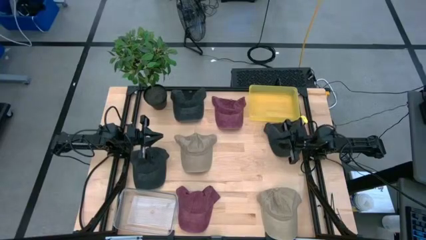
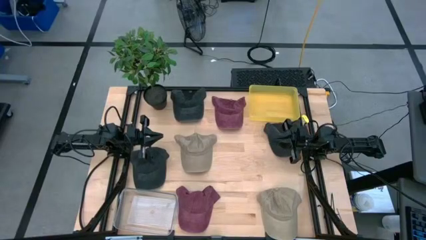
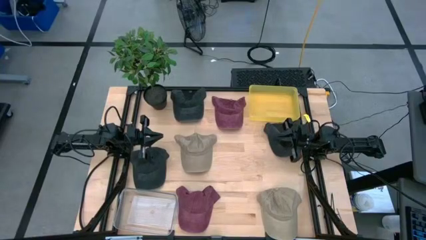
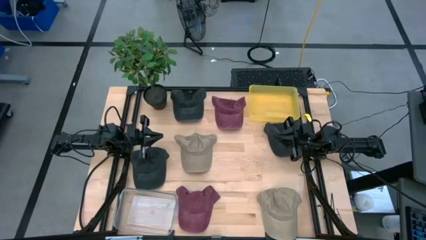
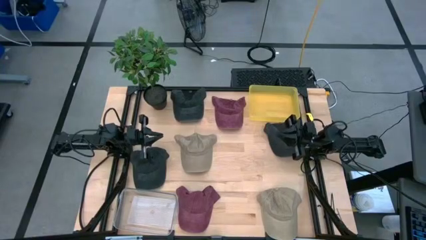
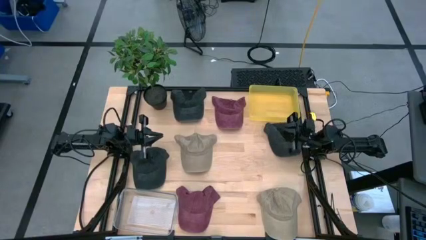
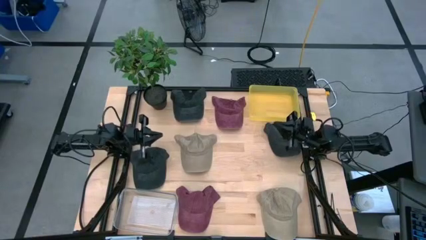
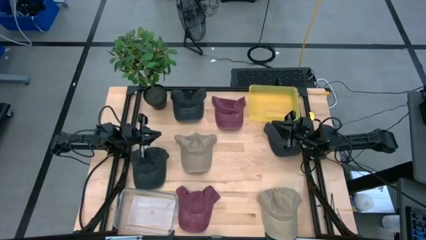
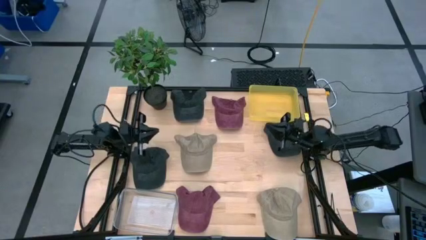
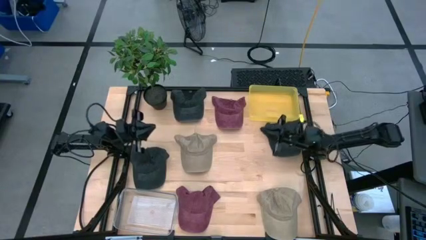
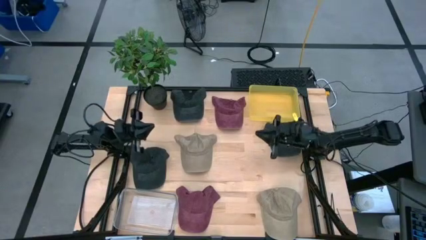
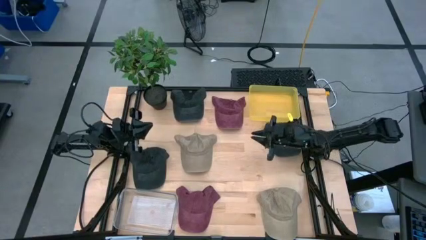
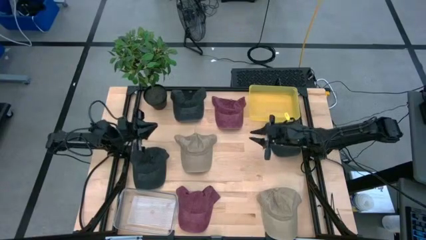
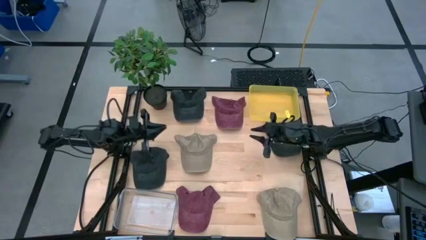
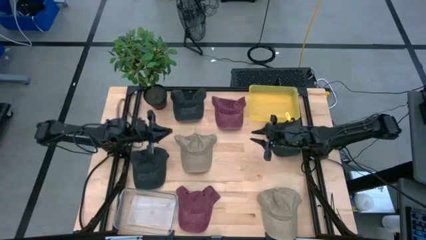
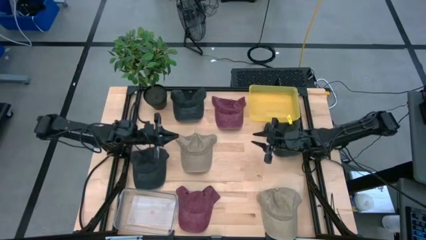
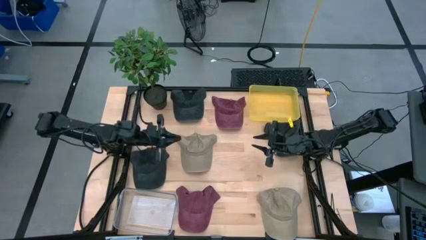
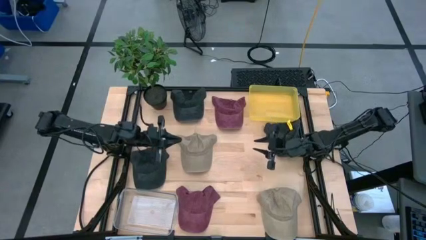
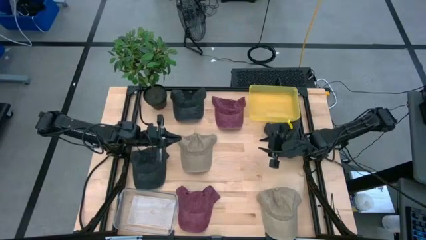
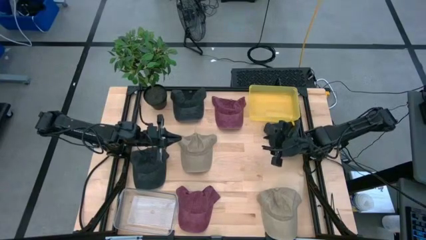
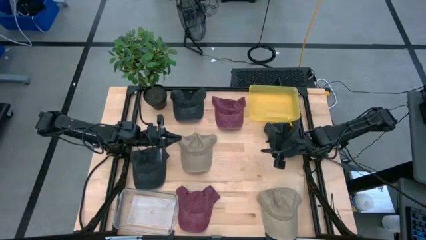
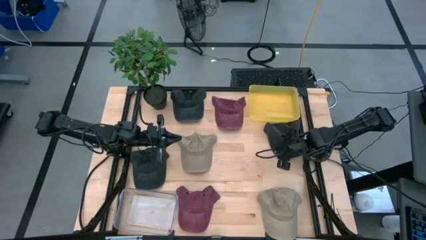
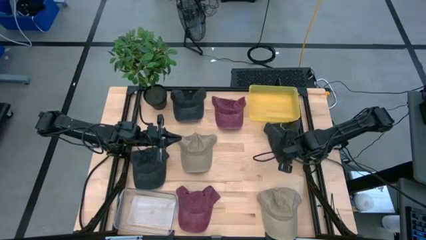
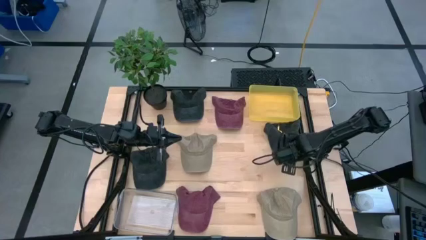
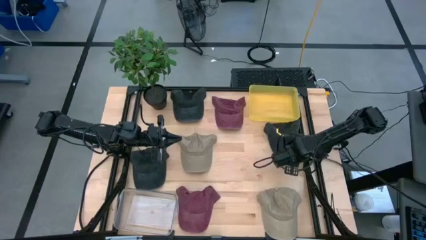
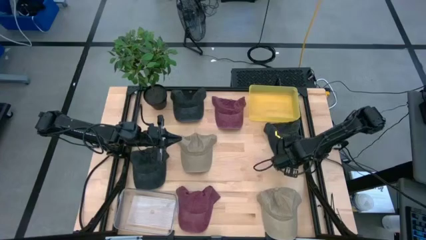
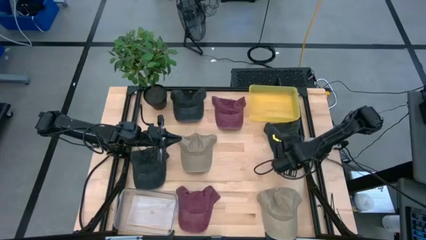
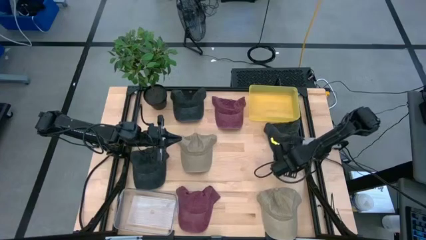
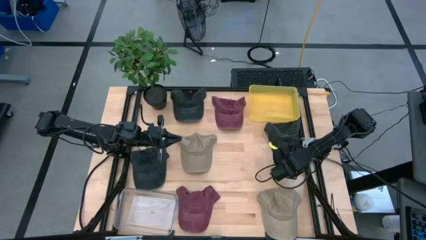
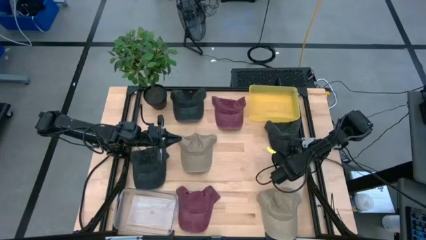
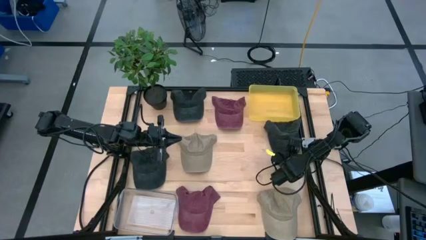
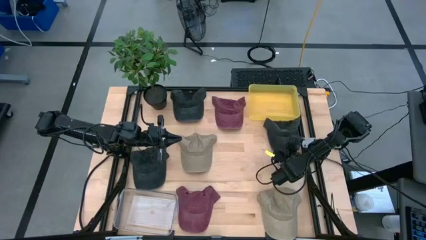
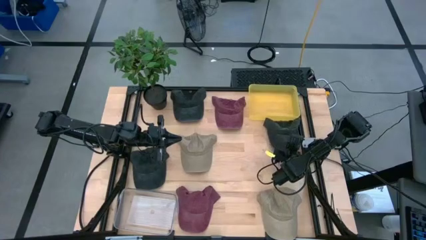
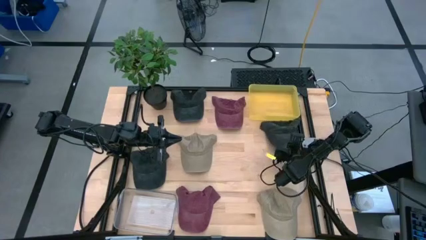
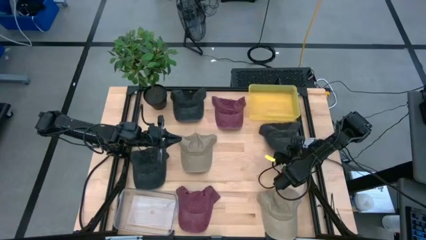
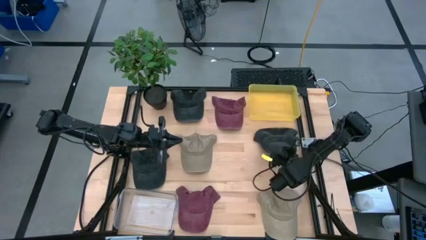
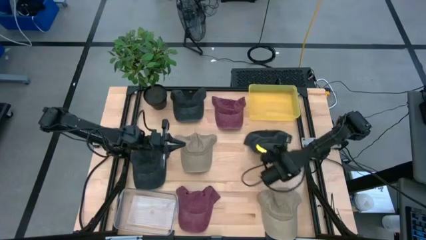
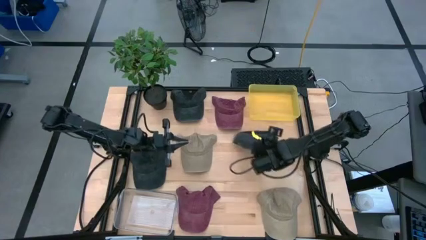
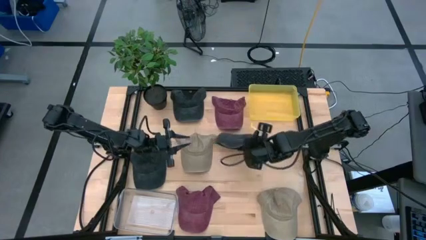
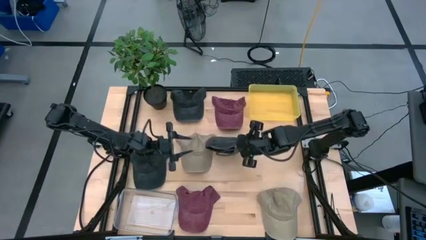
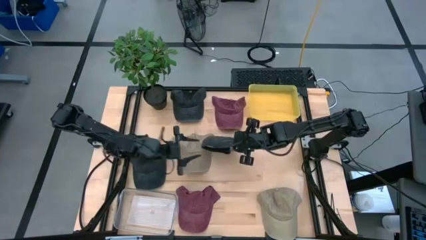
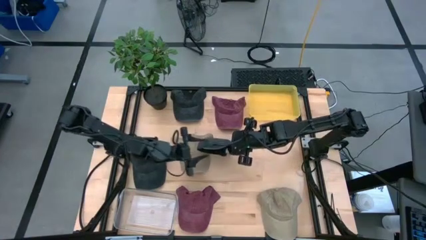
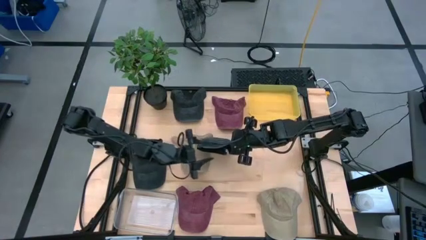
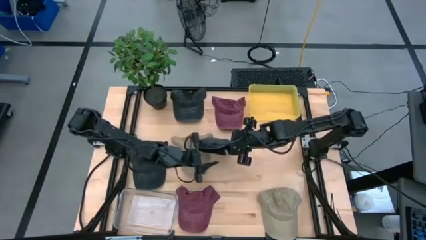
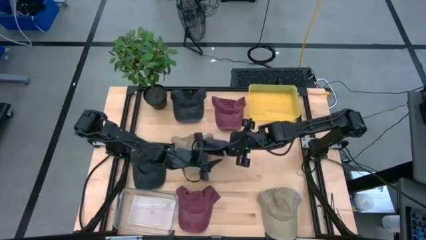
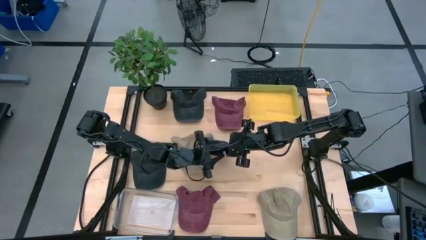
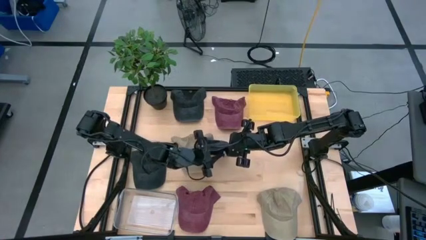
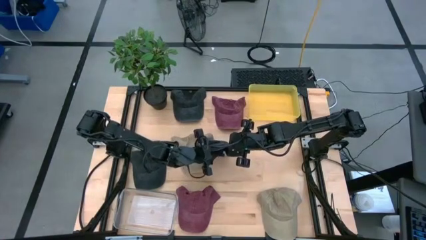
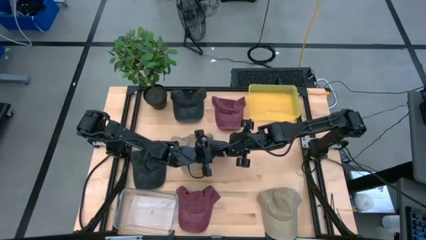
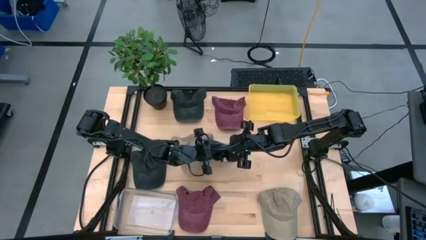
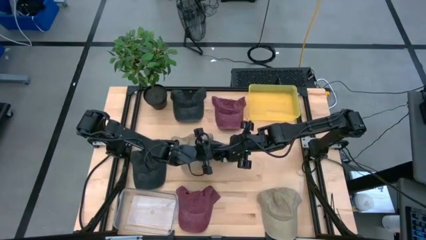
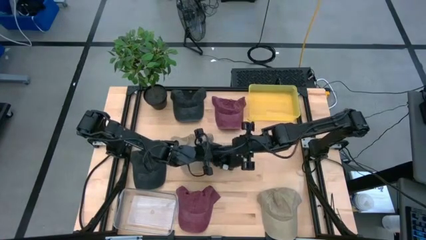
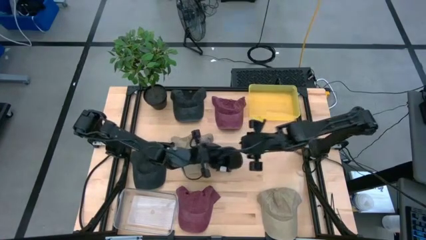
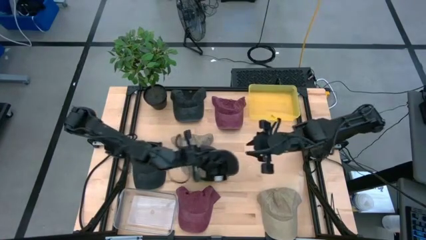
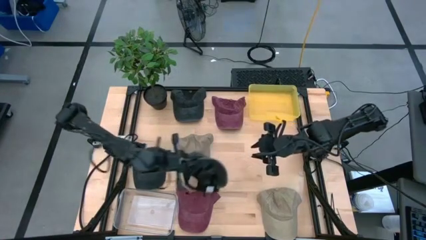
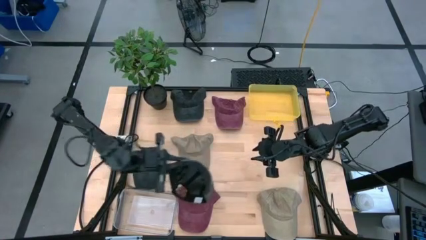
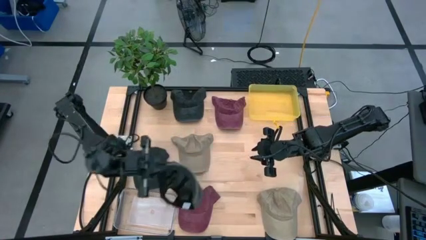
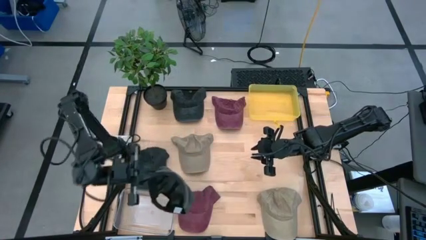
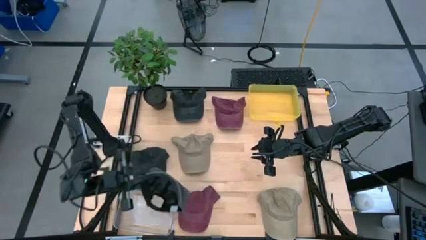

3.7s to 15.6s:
Task: Pick & Place hat
Put the middle black cap into the transparent bin

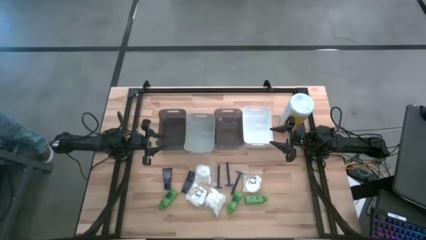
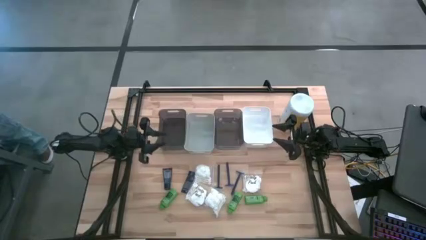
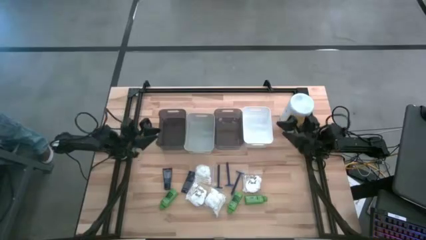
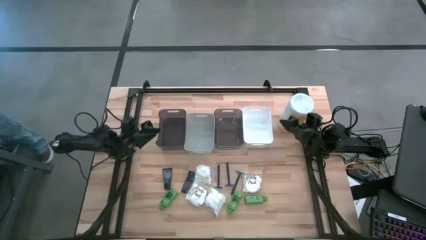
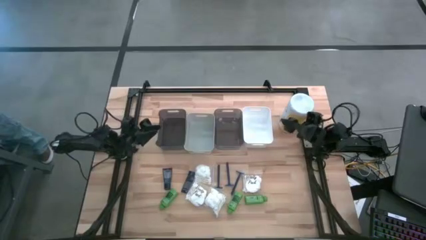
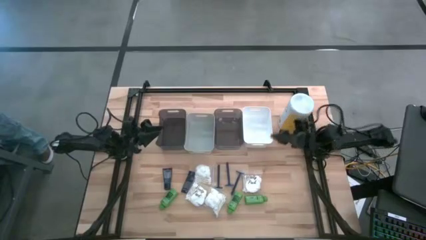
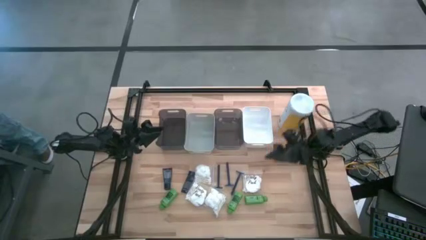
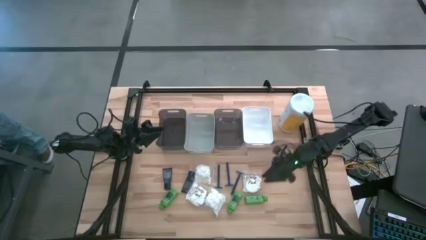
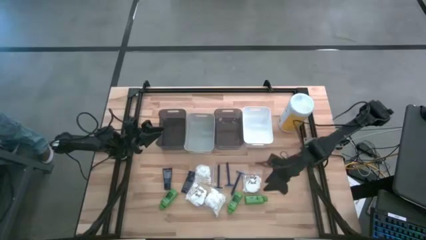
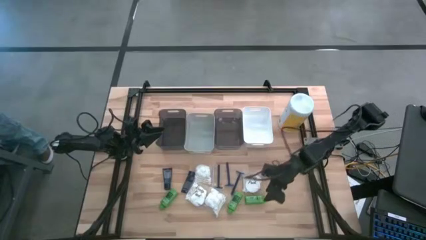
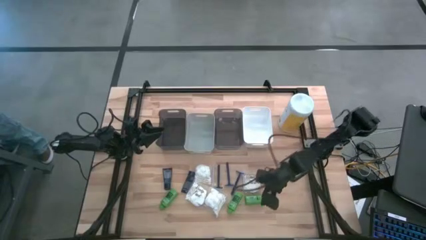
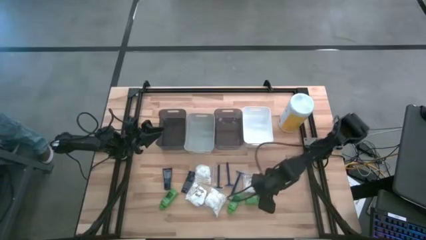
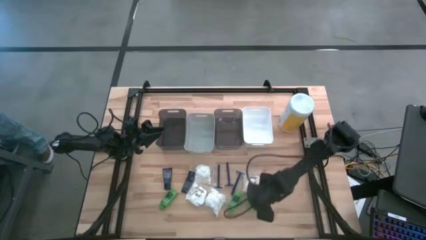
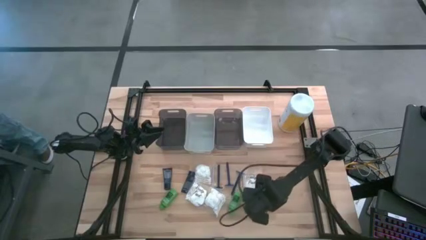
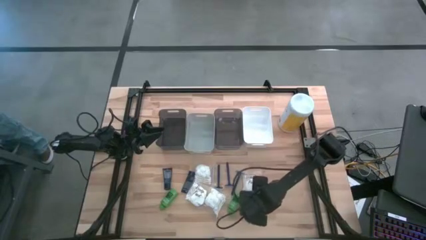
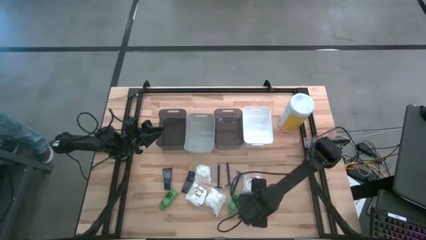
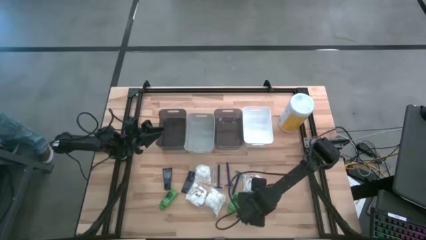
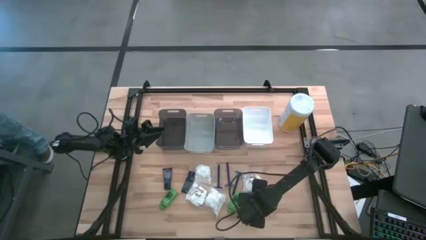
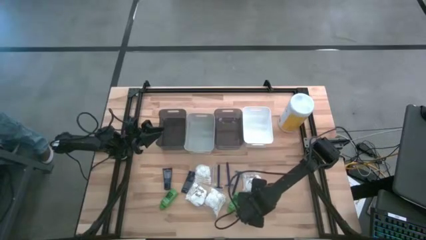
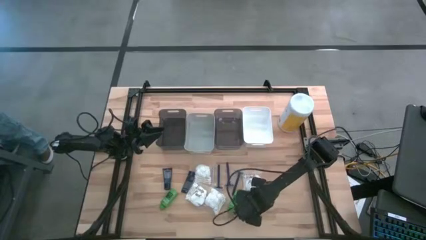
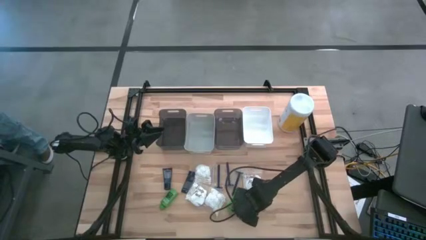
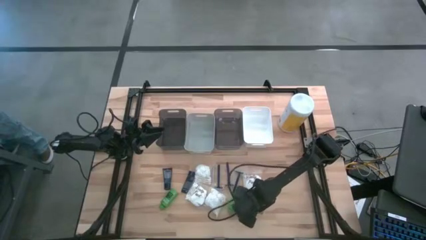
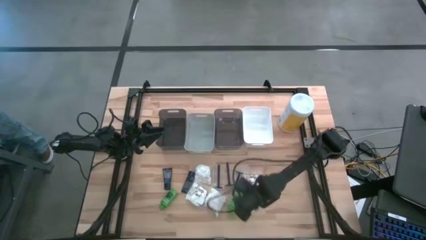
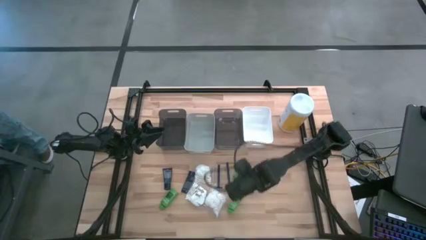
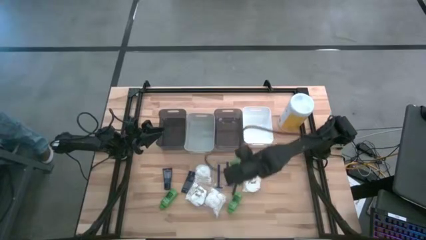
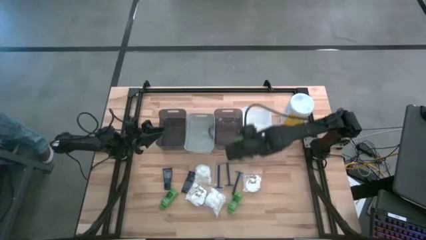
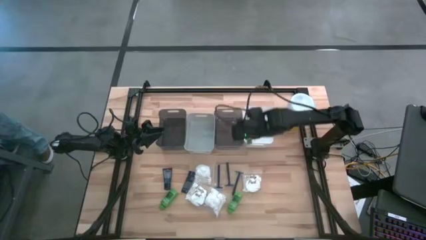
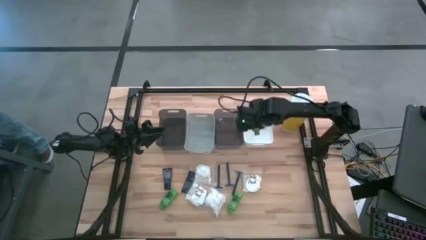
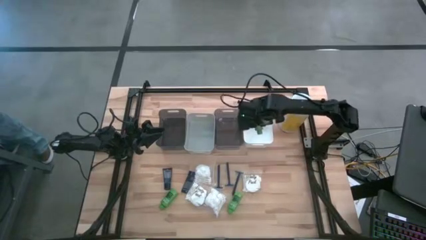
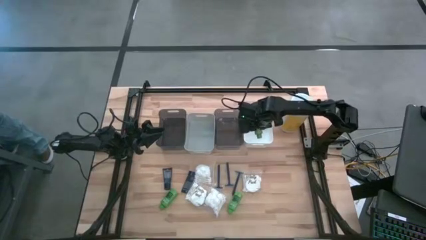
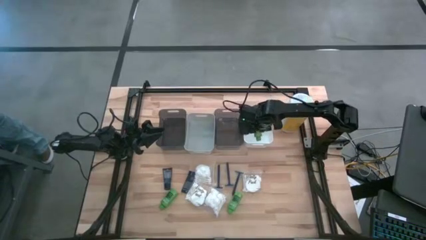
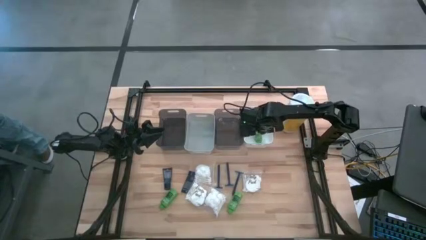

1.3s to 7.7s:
Task: Pick & Place Travel size toiletries
Put the green shampoo into the white bin
